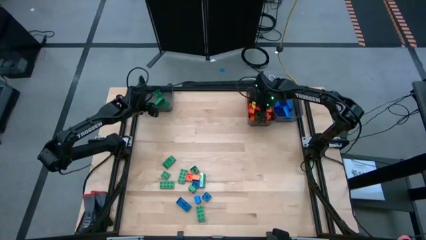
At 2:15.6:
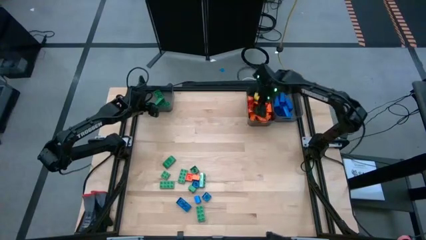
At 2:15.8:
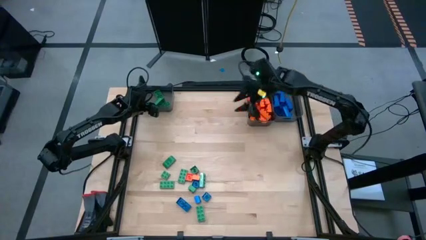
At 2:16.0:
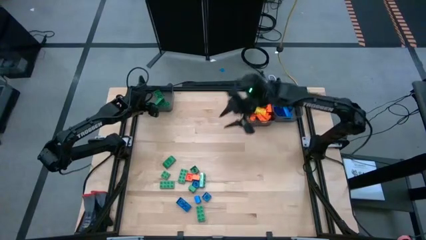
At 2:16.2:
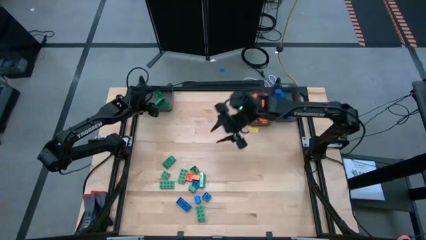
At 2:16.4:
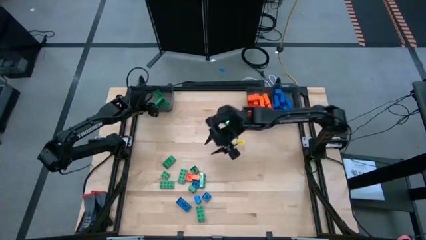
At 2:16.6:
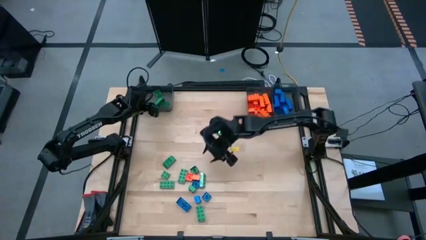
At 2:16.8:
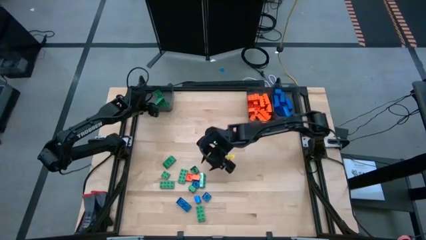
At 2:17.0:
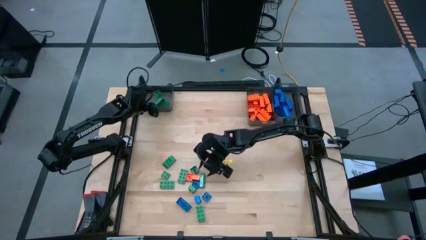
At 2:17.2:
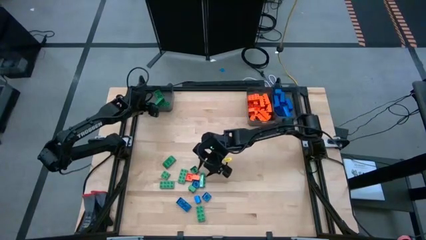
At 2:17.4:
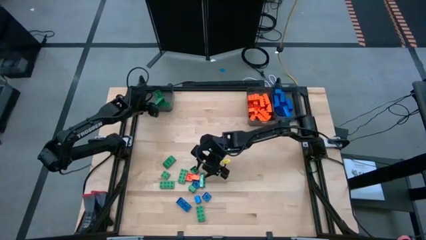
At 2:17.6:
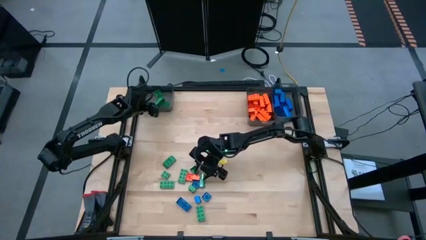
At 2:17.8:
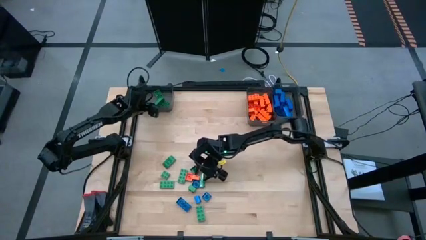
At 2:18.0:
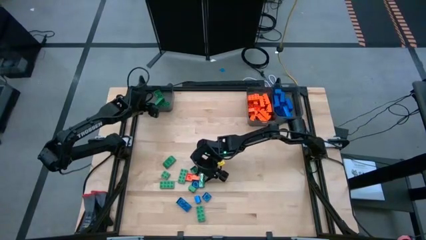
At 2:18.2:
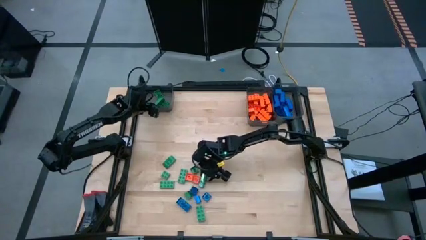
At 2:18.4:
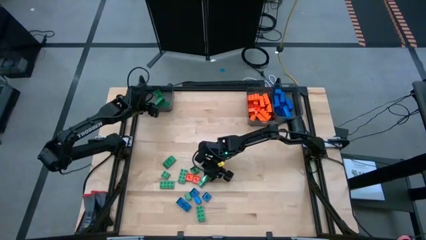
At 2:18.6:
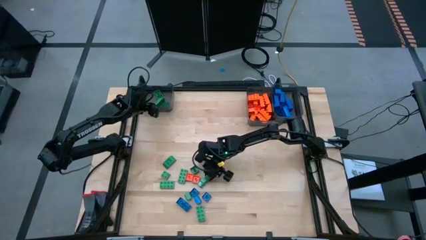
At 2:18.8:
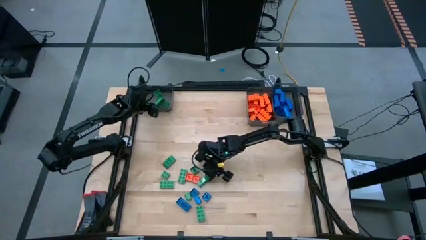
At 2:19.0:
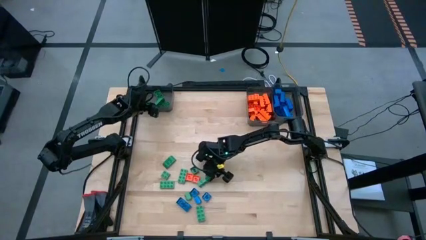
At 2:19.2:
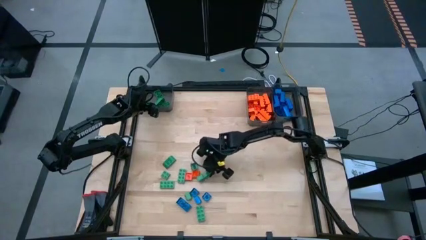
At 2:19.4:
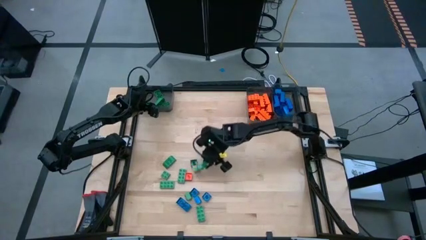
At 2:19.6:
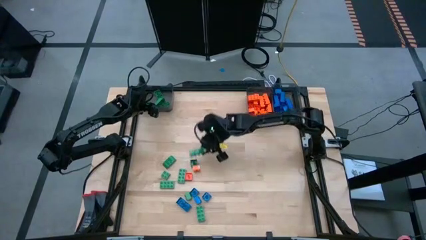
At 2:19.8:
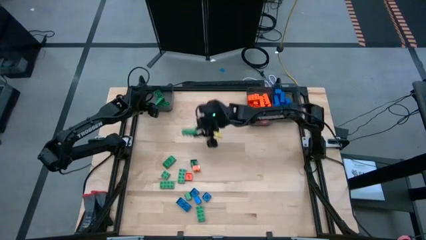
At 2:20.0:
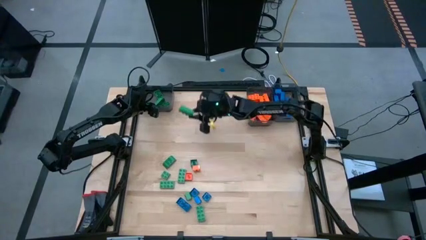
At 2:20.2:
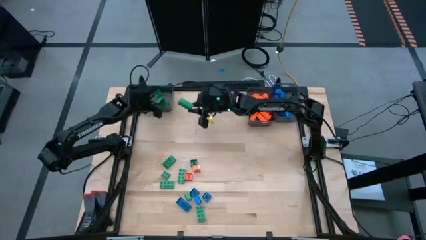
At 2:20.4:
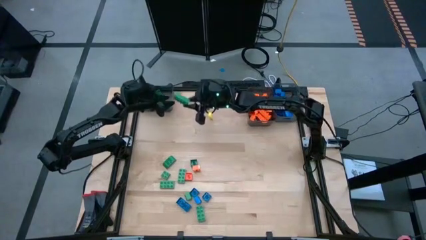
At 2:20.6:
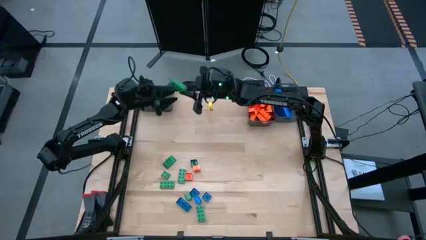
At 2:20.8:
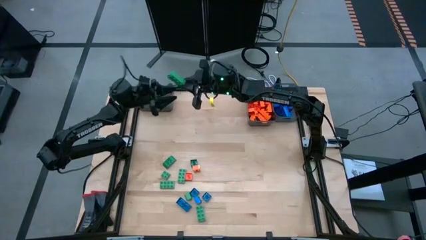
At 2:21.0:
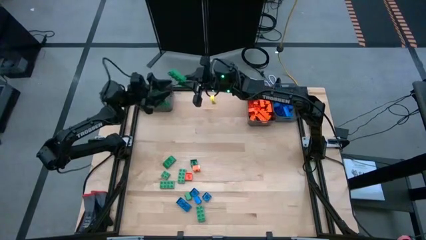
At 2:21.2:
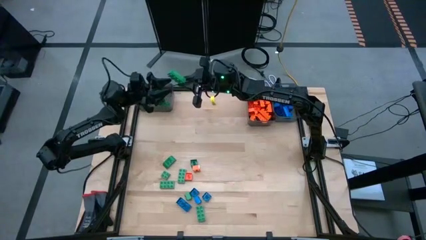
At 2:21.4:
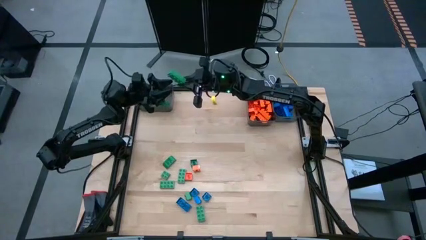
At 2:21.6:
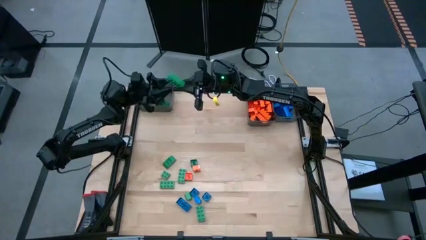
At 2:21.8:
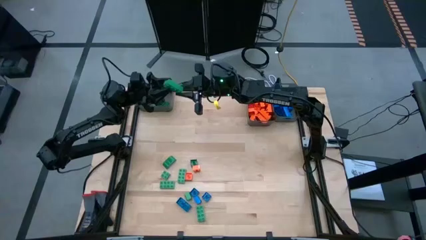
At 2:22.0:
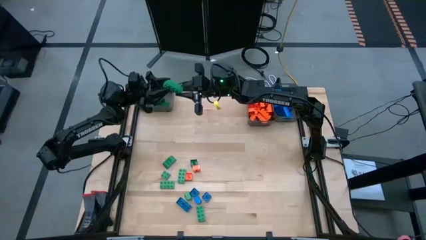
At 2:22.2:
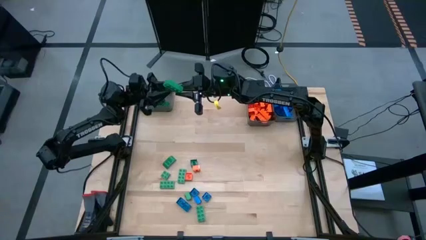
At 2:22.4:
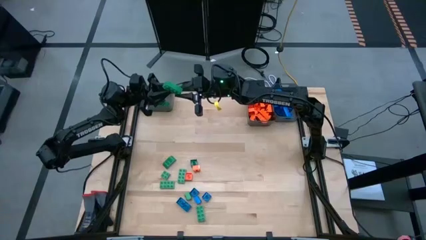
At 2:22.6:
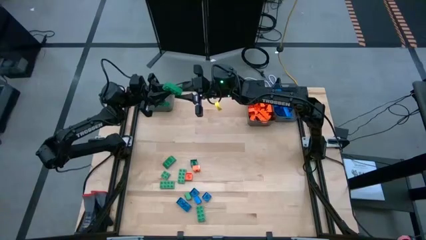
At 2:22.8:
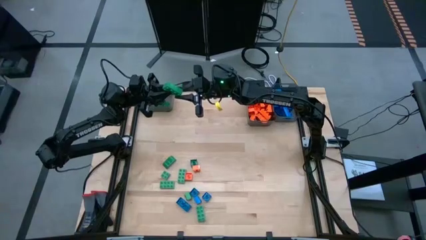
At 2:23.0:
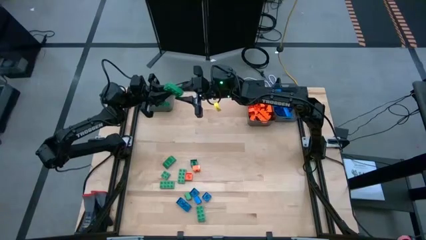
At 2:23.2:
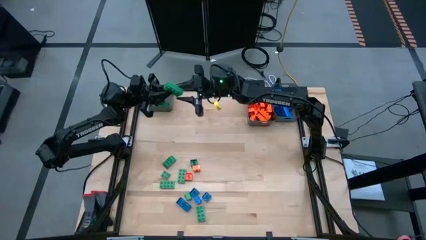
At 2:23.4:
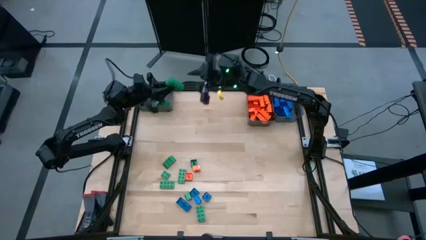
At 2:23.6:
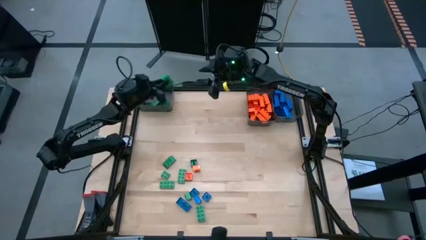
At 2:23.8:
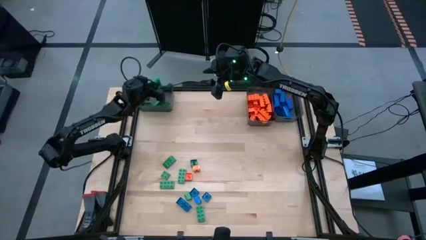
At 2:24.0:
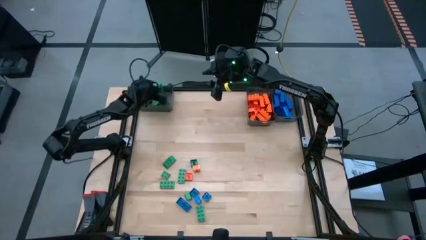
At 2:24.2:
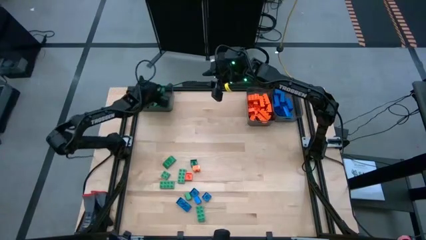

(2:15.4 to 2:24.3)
Task: Sort blocks
Put the green game piece into the left black bin

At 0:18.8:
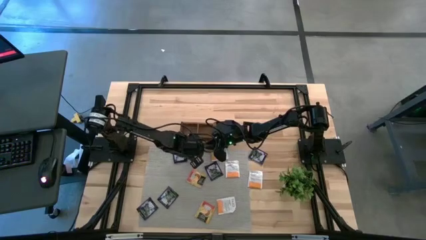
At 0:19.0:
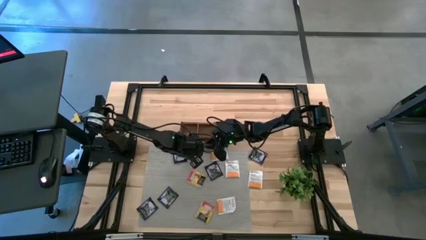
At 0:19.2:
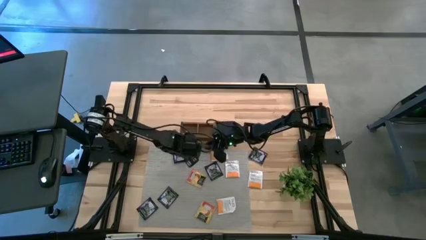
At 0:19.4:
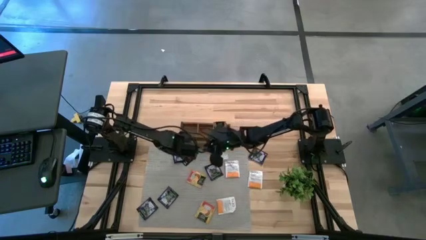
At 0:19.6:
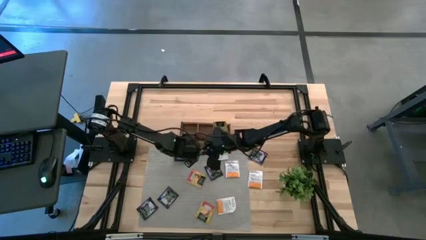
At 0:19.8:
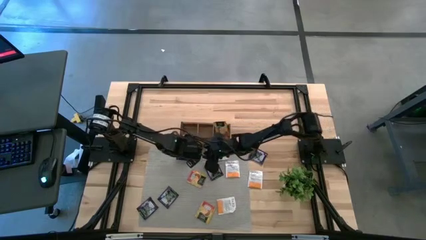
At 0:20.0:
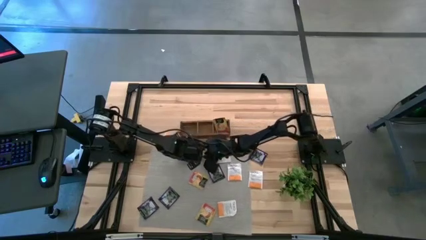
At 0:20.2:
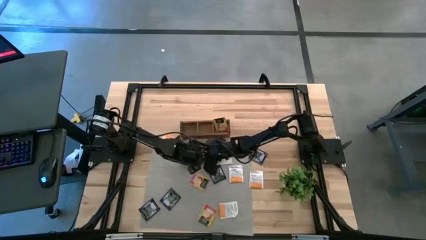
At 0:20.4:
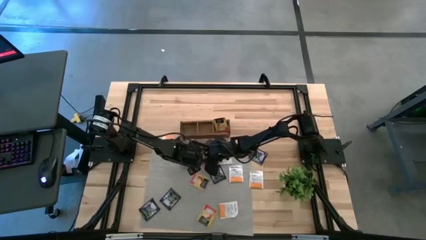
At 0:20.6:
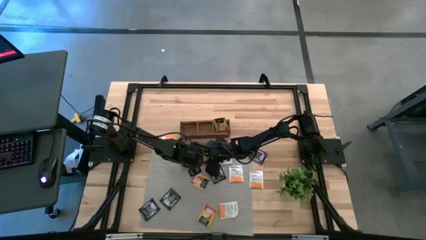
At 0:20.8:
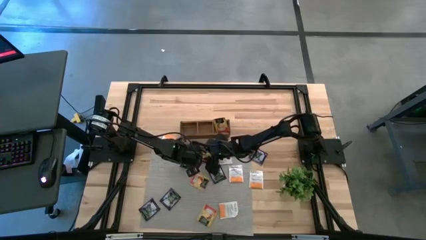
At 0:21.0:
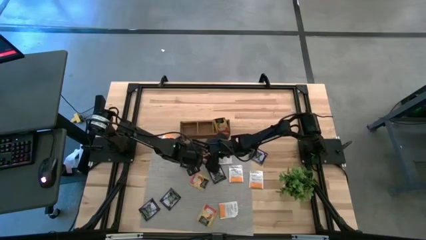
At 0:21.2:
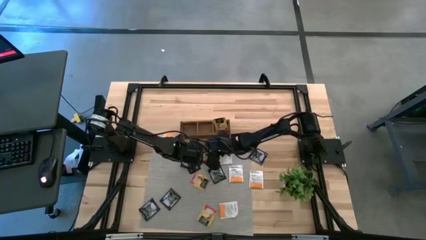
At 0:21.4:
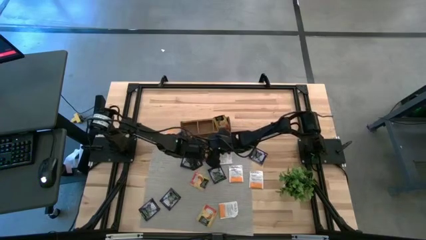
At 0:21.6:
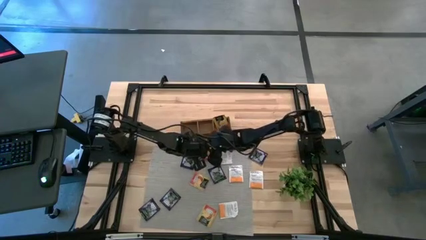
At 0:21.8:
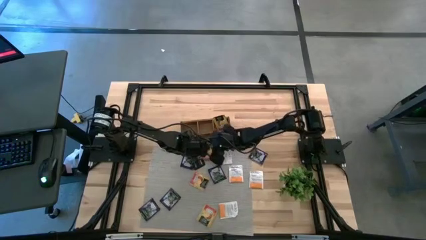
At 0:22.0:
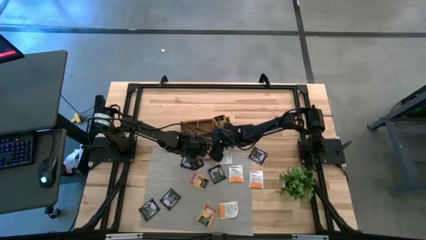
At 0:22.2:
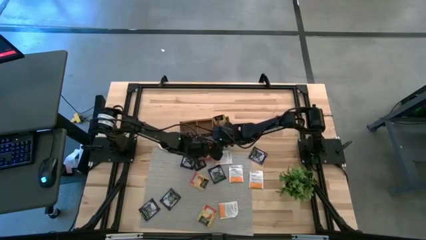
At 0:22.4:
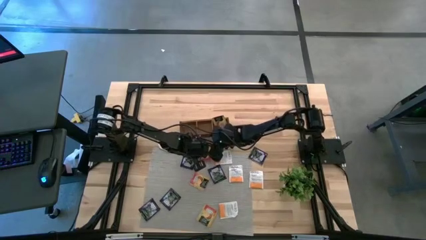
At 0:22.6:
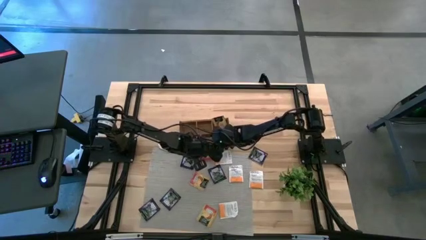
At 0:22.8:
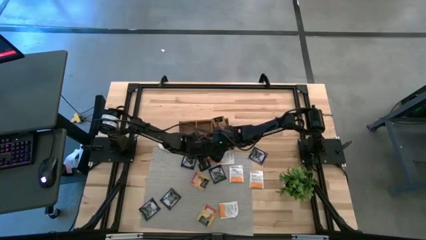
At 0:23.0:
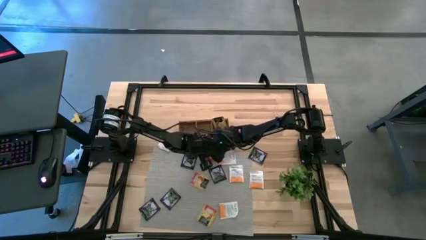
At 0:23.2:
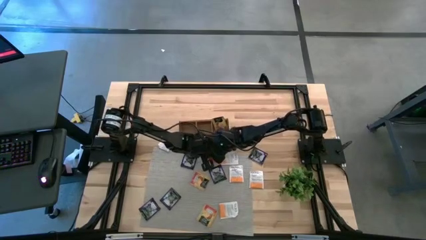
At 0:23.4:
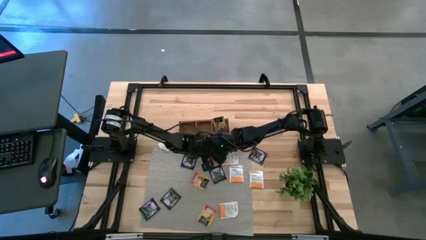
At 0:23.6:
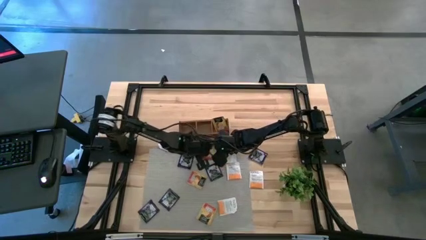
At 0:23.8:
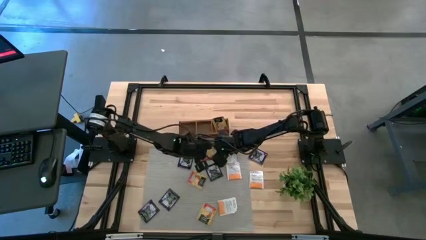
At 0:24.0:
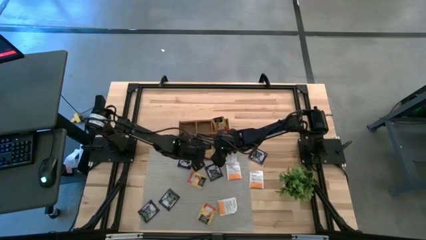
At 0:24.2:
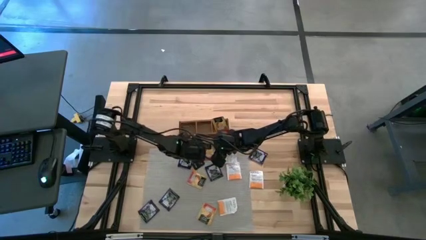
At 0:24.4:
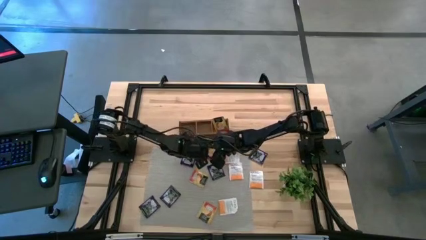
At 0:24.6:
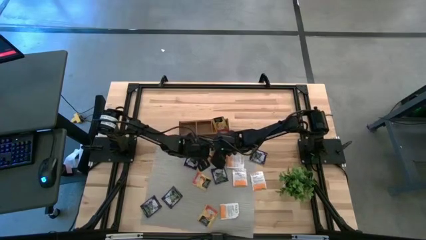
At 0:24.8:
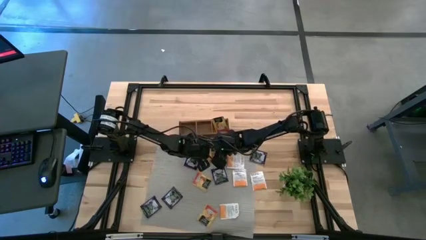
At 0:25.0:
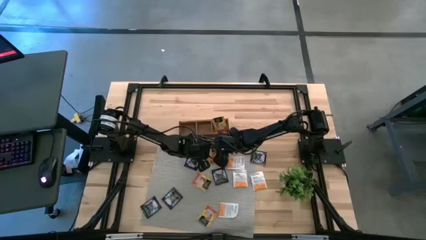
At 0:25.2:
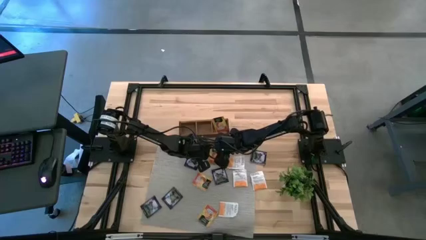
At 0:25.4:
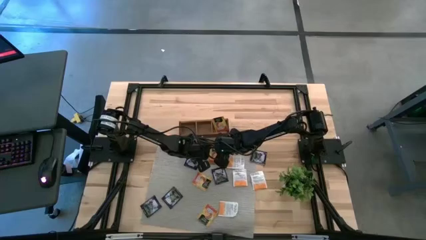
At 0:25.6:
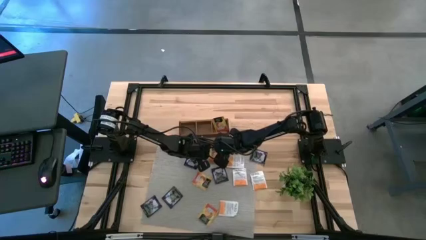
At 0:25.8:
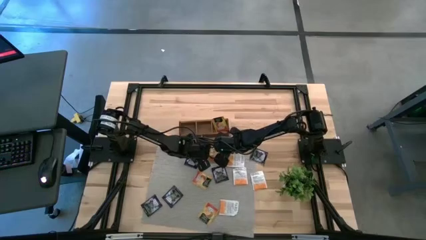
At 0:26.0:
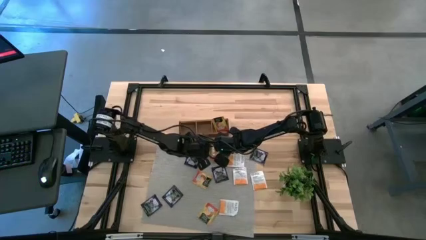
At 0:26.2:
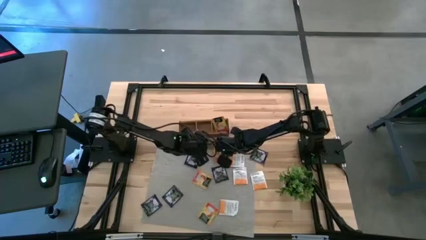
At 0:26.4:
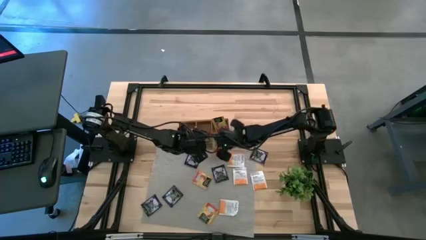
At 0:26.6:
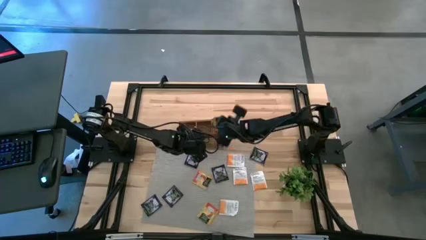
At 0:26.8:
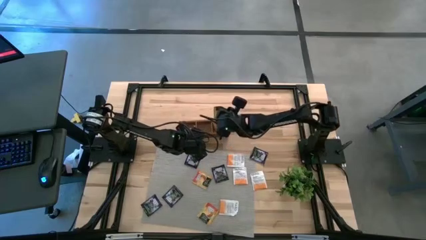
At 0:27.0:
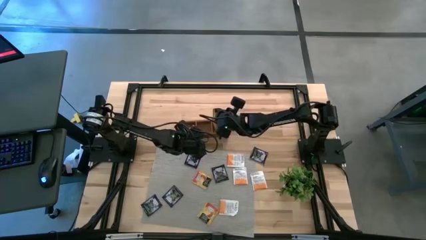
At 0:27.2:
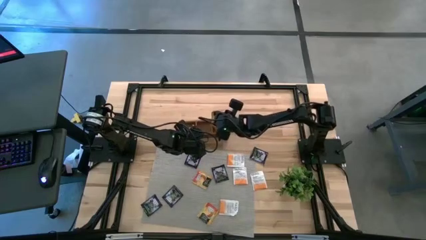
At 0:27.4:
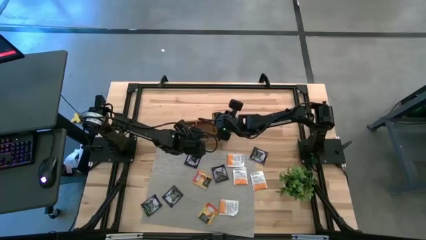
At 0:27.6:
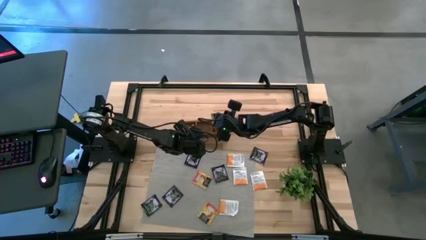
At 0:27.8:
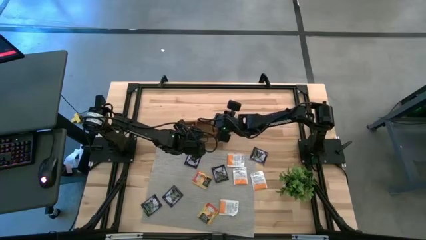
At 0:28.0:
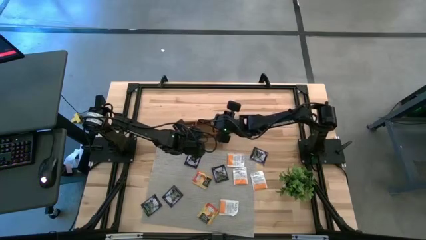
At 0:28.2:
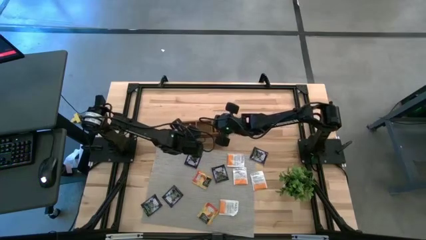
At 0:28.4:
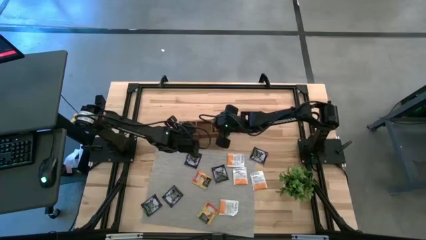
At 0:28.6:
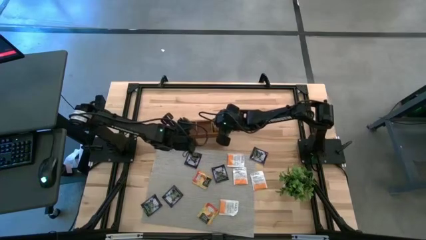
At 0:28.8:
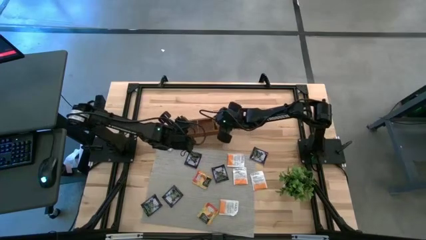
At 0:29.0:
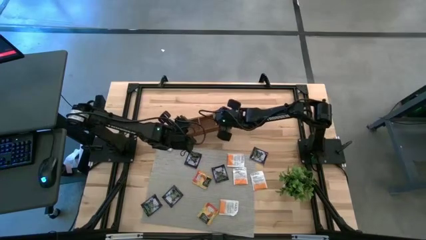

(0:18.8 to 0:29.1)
Task: Pick & Place Tea
Put the yellow tea bag into the right section of the wooden organizer
